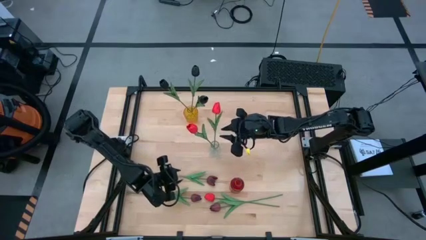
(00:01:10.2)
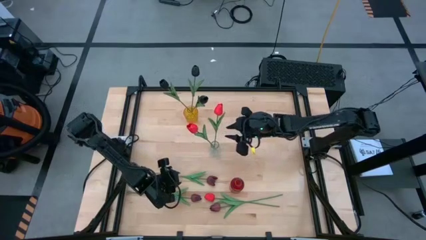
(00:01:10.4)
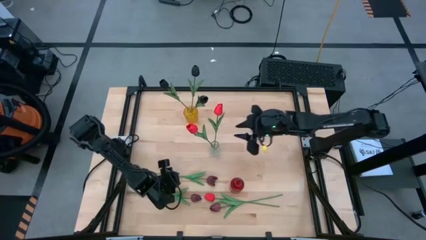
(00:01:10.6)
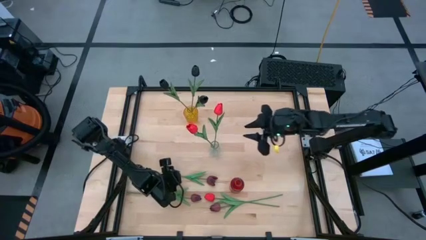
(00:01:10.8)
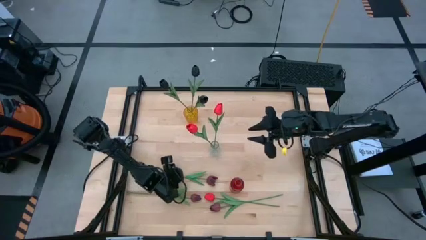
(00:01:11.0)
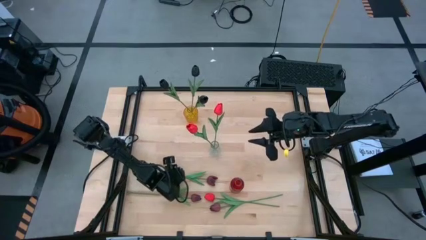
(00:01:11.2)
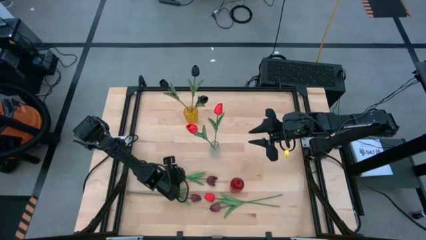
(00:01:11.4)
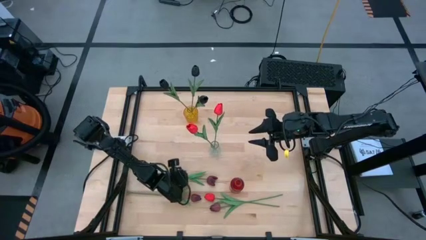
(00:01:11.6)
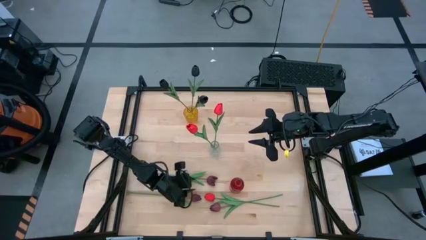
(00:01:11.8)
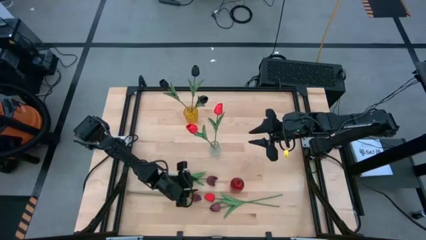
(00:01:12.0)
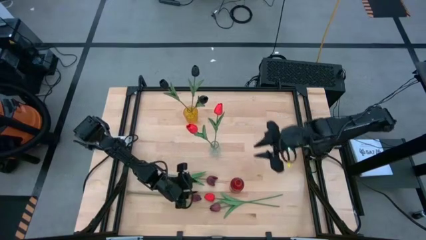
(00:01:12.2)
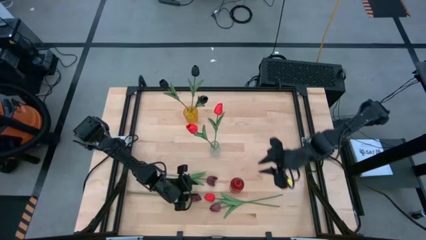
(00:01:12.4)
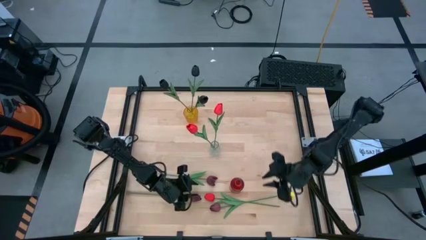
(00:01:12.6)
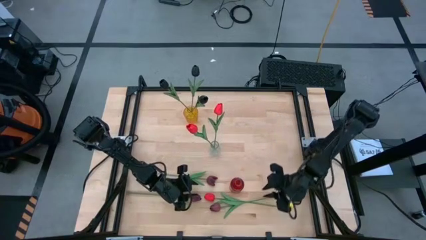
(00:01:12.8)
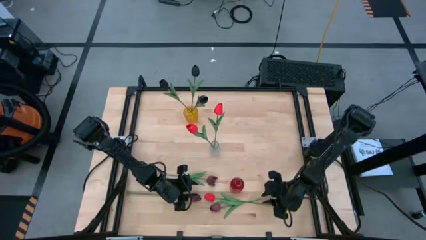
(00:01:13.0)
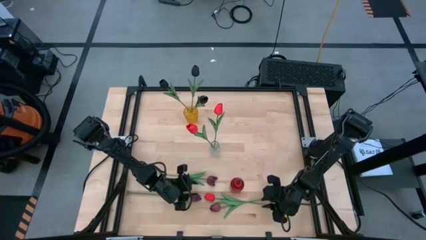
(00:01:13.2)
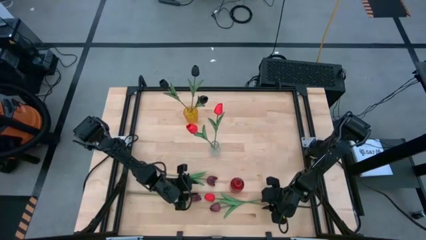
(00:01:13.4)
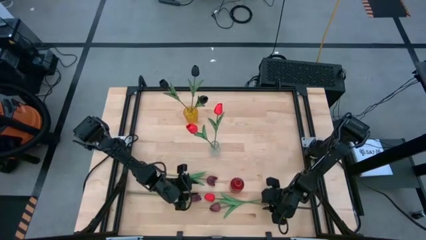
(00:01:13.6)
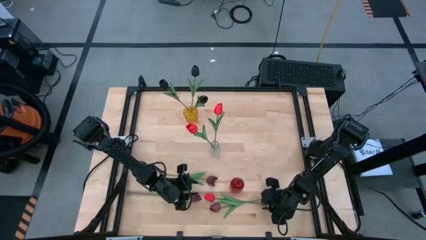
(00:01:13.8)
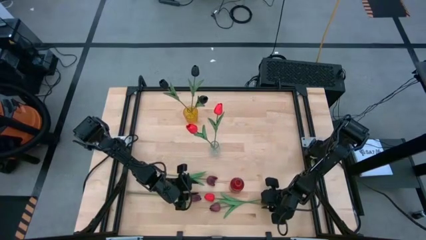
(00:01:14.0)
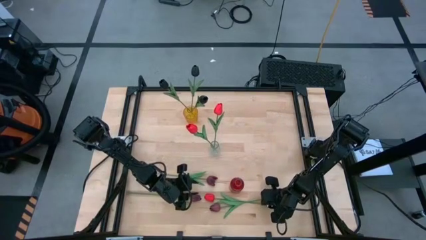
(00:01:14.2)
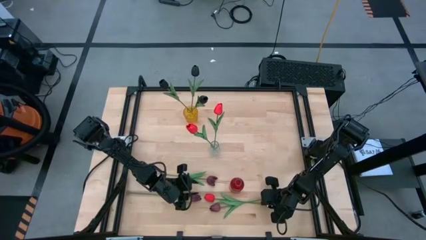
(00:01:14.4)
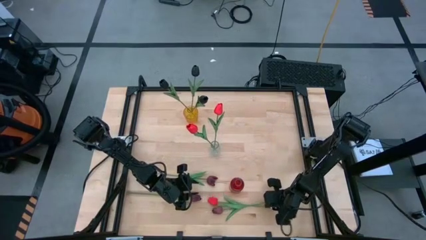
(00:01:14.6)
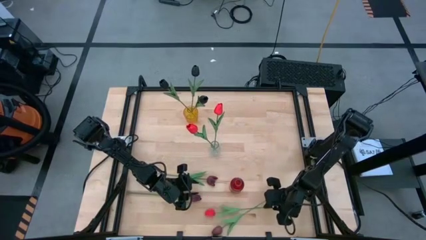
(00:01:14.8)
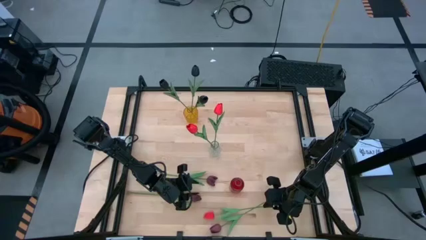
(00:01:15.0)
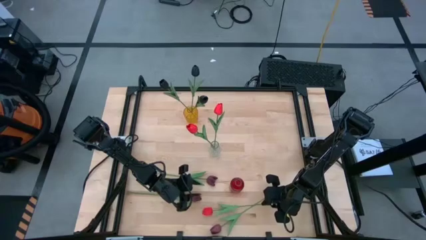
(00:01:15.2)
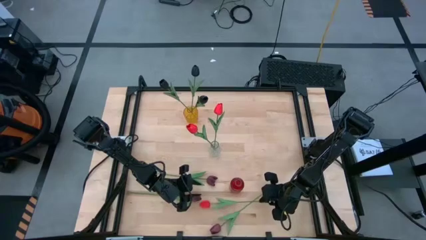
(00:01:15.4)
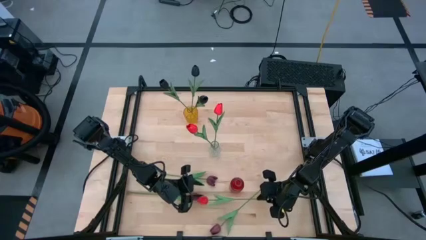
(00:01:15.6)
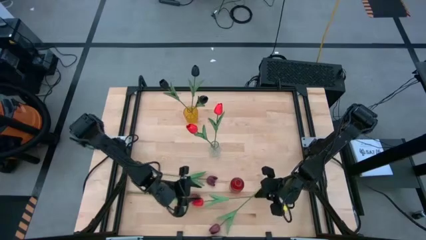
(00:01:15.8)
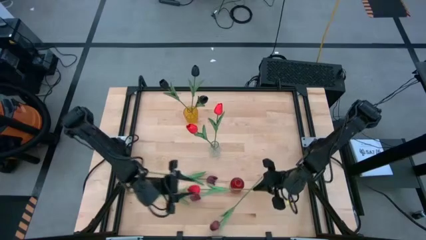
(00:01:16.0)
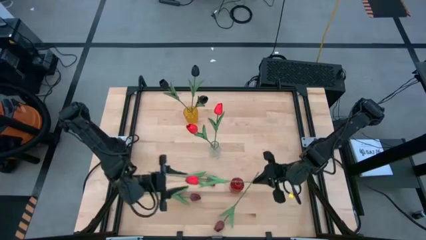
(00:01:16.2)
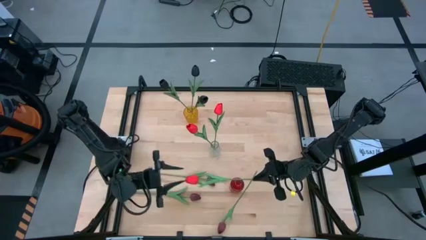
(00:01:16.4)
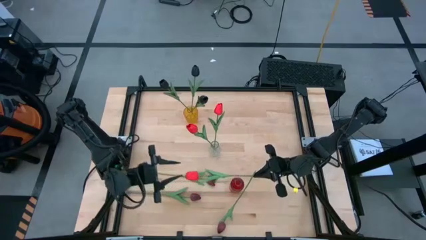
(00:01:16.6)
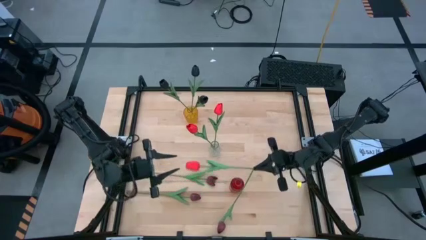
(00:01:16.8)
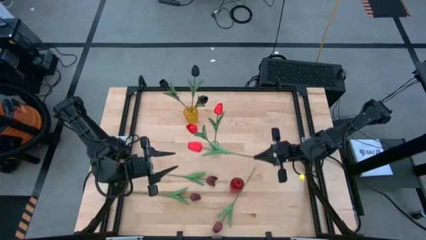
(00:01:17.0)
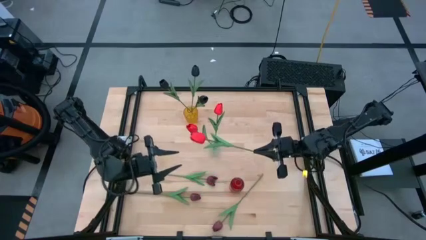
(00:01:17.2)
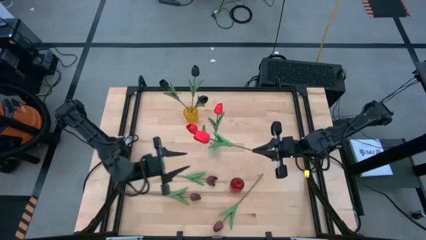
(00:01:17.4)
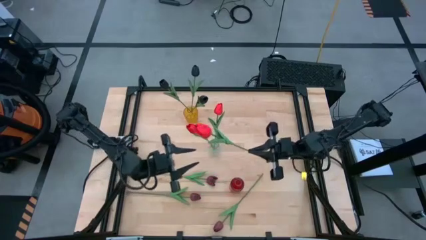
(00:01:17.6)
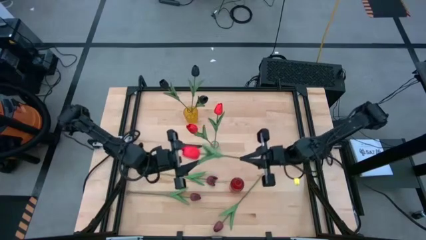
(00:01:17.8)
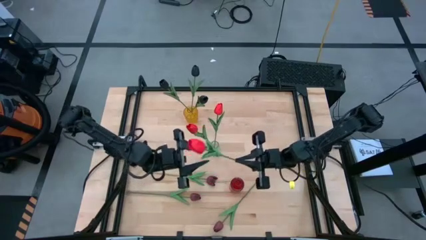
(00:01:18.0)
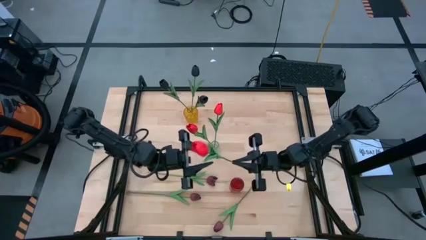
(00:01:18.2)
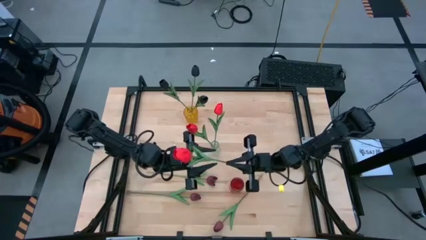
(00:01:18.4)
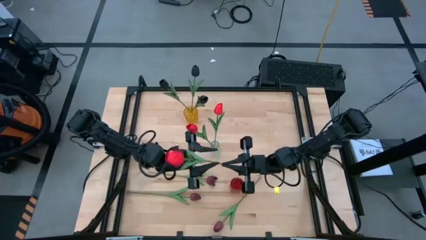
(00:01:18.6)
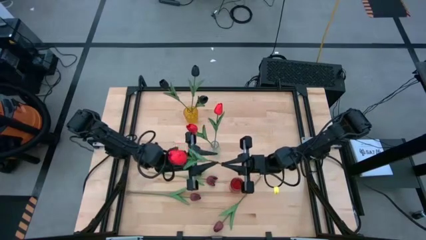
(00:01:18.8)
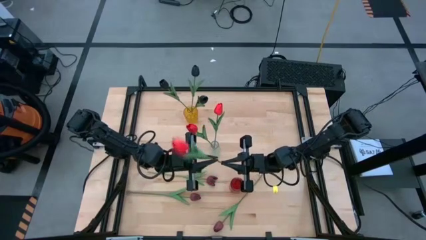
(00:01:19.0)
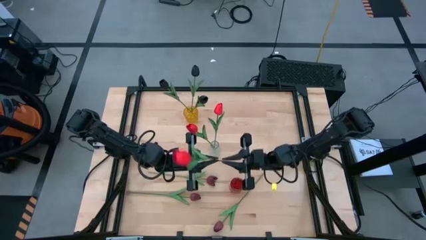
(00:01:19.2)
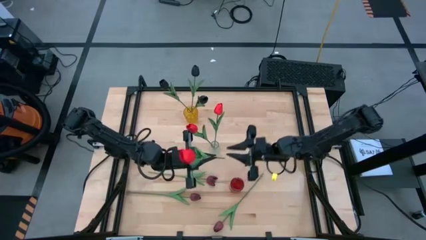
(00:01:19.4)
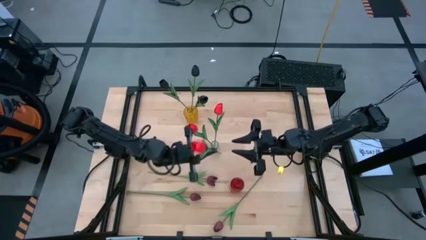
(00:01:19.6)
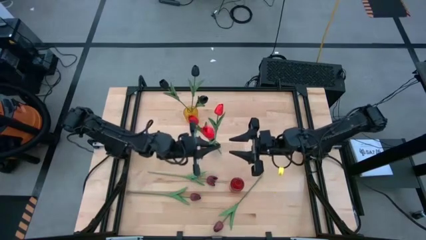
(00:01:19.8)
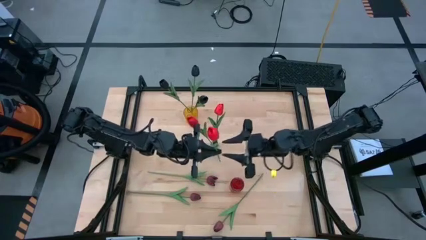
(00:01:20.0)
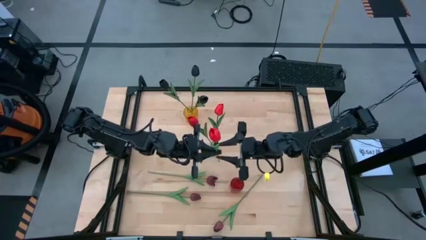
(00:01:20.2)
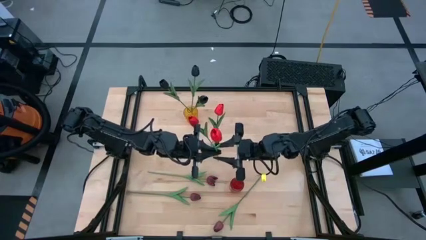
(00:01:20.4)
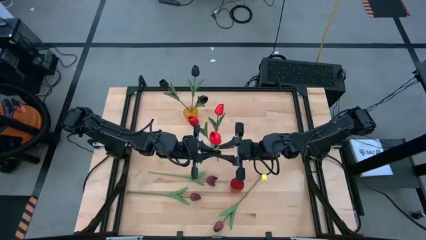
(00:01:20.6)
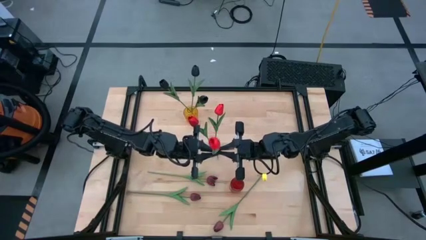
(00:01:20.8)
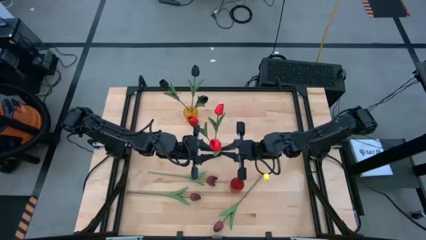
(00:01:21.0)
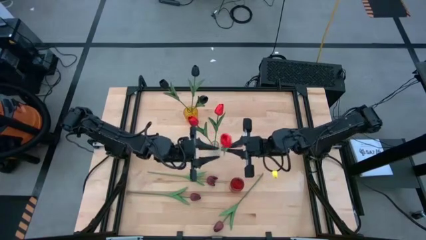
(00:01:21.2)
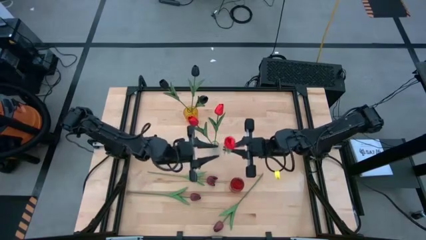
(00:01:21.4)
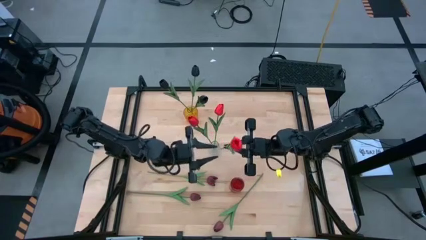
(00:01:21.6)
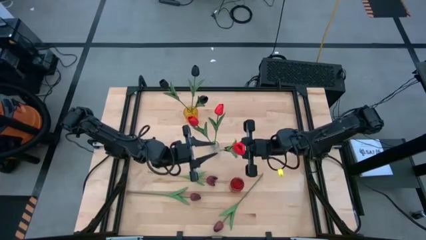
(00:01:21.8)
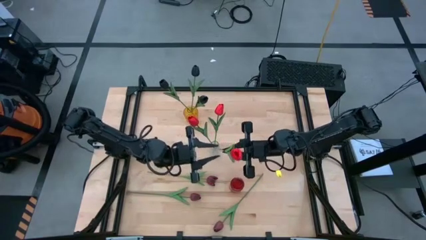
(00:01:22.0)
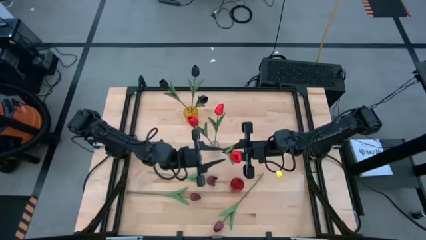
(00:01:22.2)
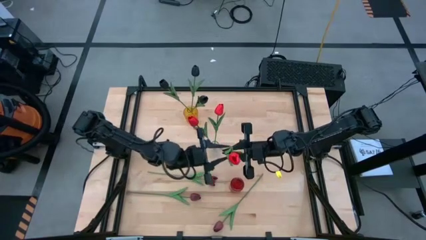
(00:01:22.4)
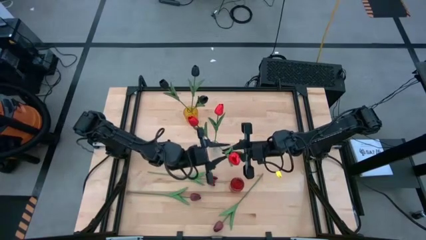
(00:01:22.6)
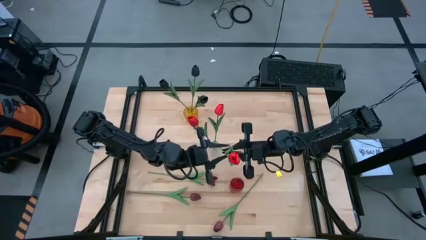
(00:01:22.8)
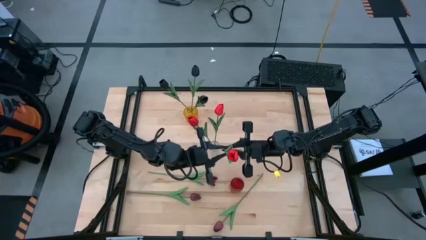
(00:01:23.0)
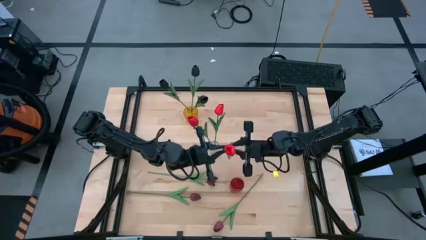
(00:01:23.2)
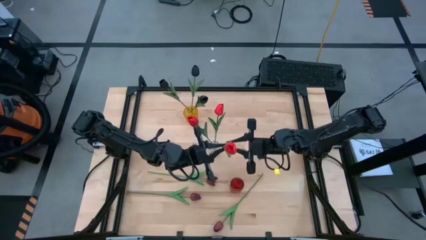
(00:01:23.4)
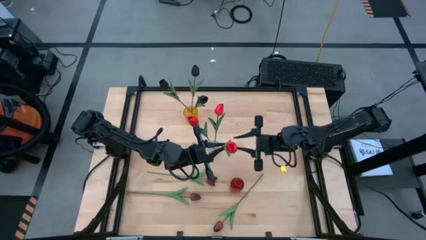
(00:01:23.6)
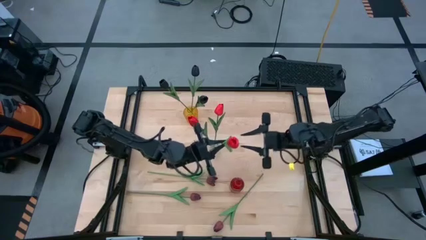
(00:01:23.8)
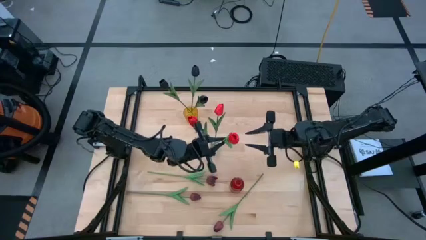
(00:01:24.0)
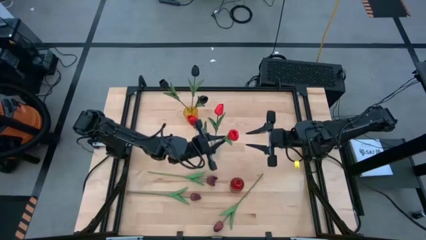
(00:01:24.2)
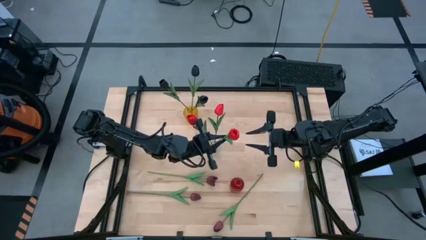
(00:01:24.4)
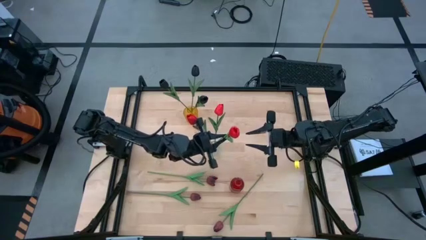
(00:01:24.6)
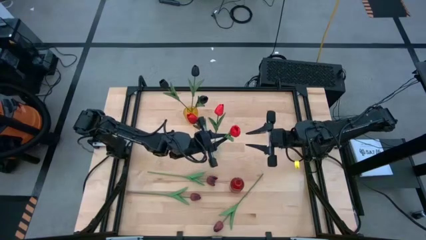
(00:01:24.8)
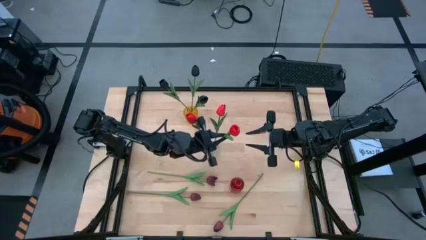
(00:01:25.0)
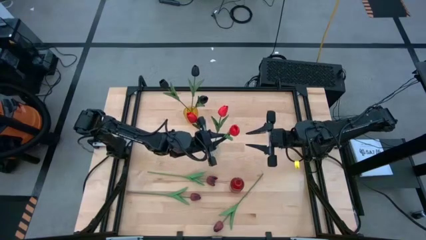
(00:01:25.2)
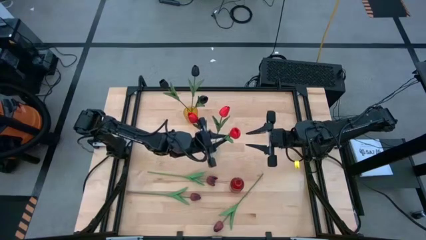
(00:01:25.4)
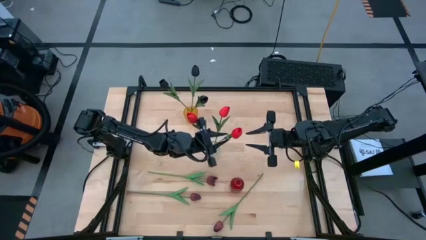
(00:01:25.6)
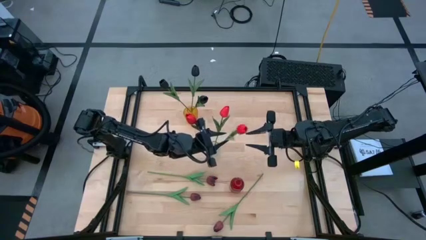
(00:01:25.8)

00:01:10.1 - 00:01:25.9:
Task: Sort flowers into vase by color
Put the red tulip into the transparent vase
